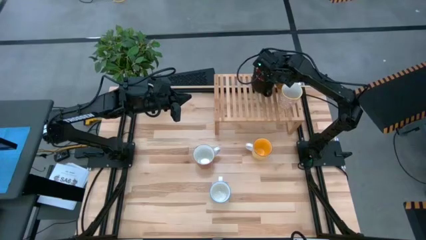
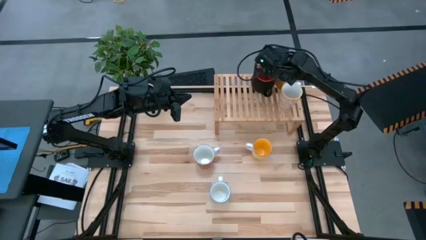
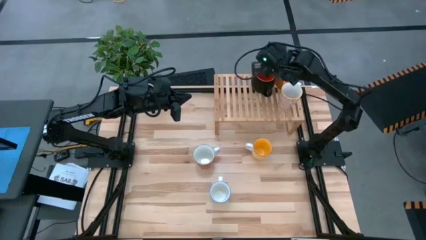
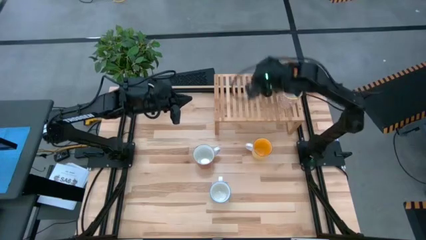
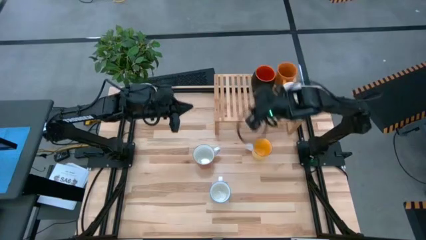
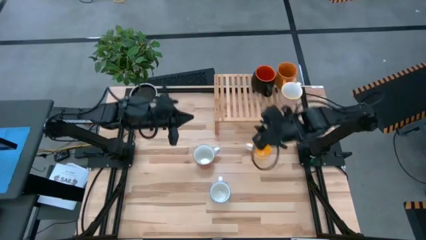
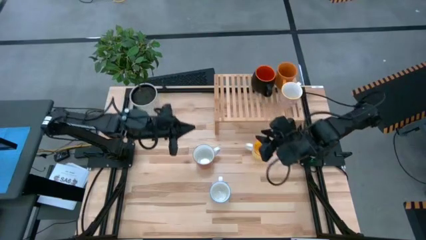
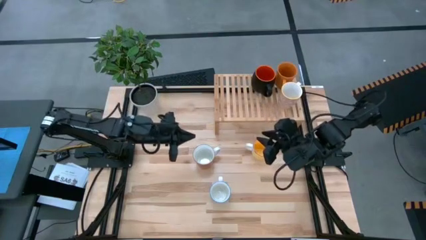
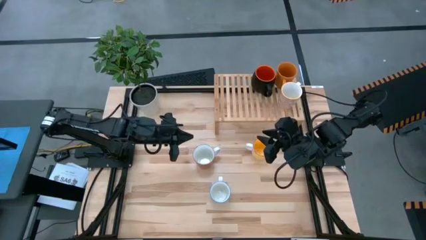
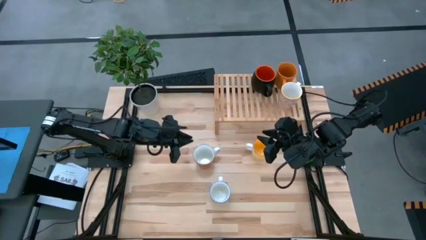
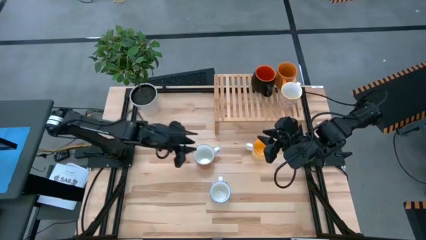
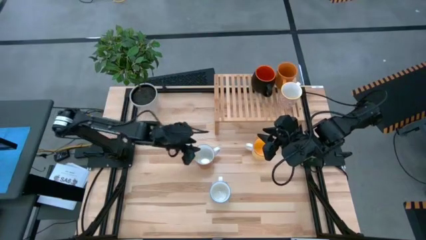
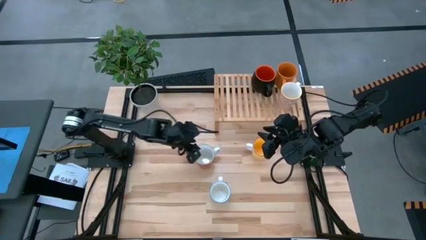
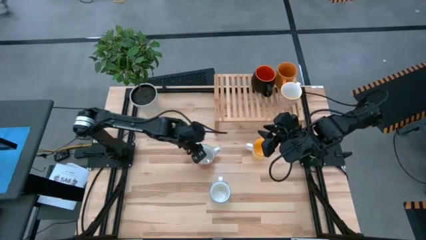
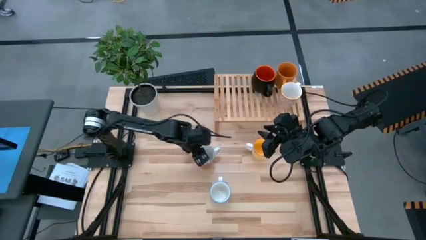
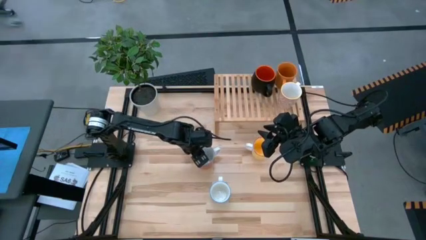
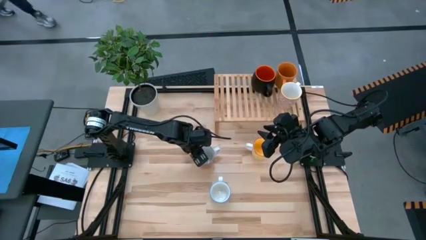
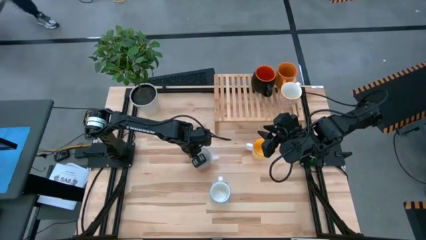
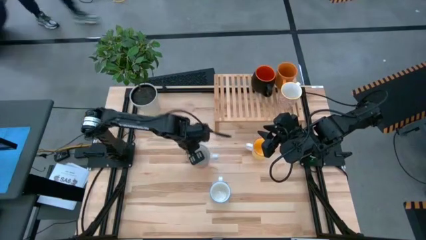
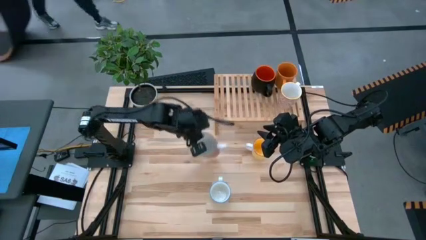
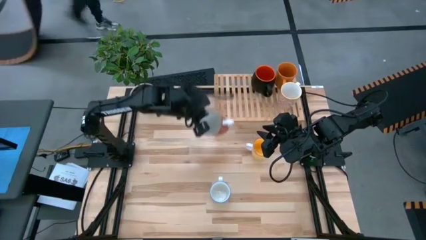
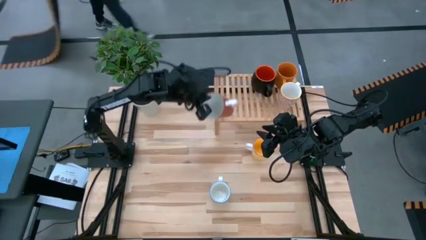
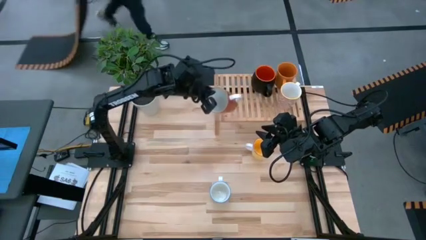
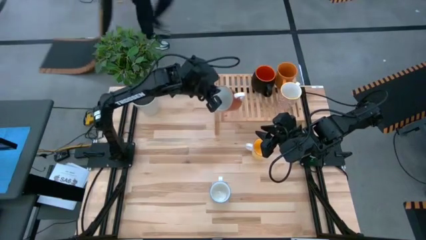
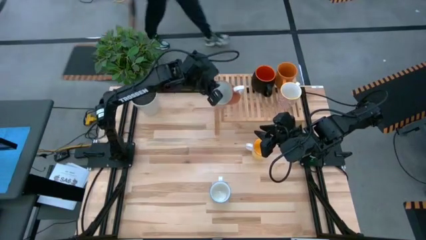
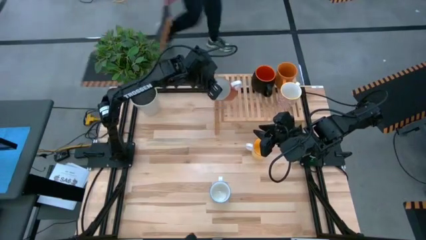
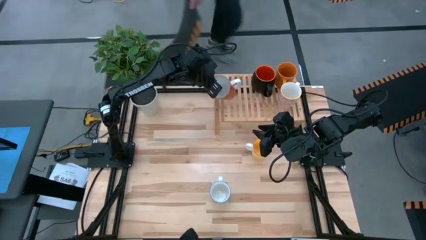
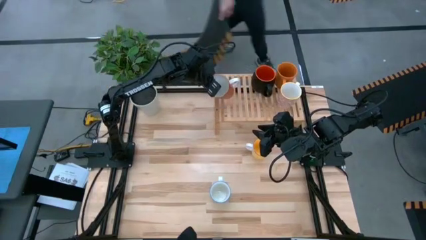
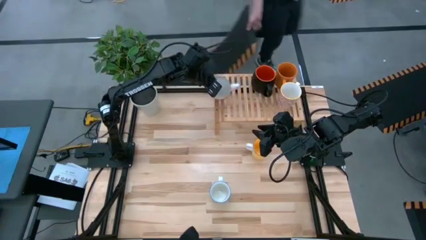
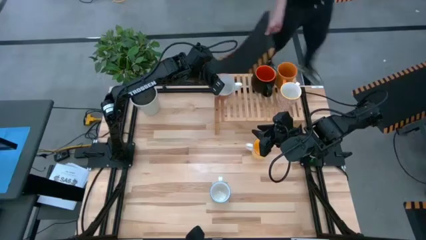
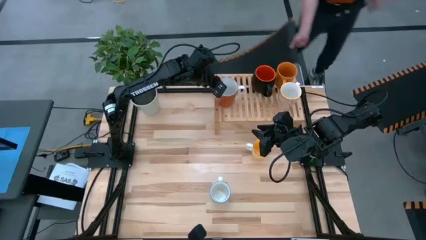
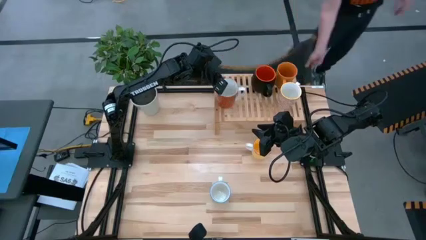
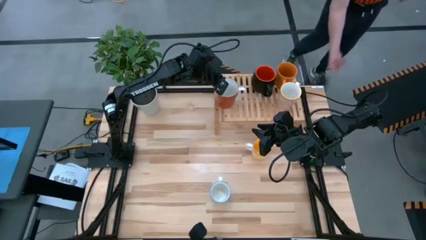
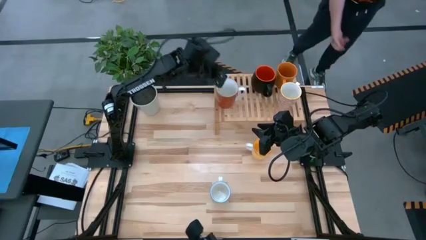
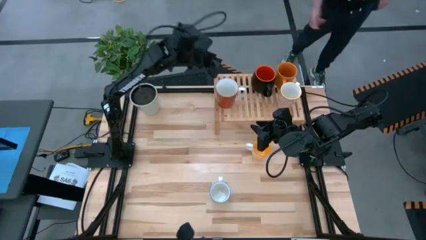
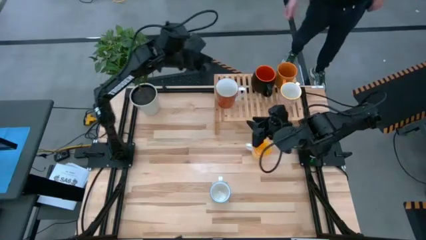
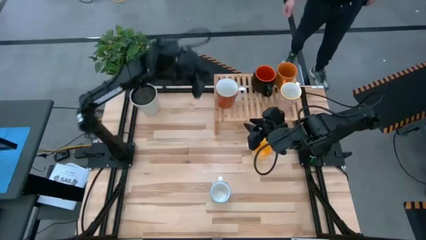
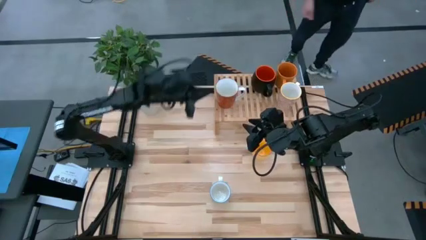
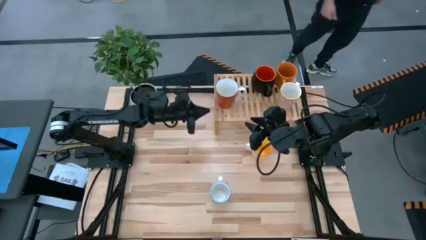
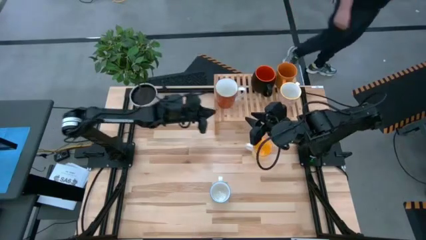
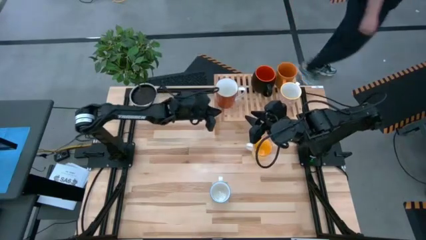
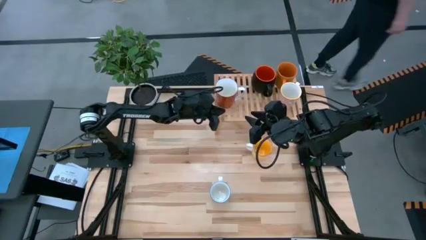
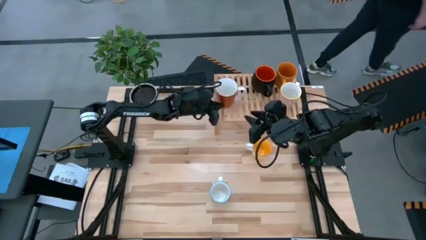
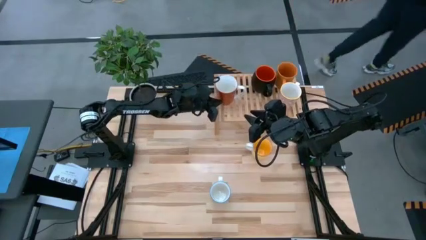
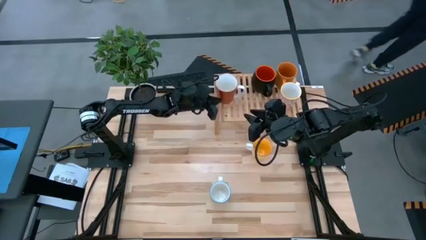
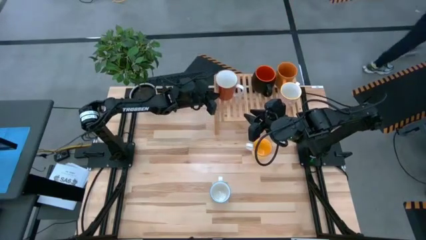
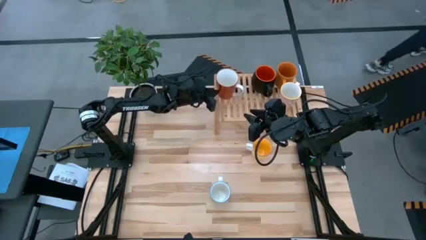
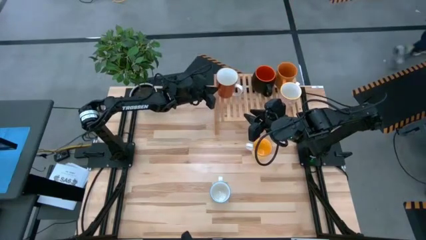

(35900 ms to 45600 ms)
Task: Place coffee mugs
Put the red mug on the shelf

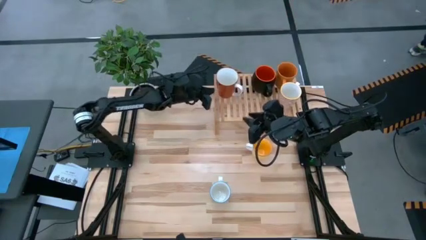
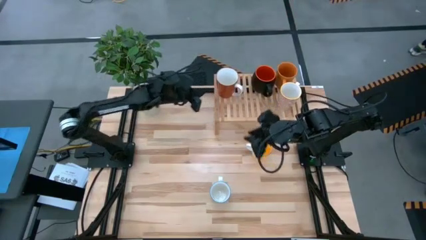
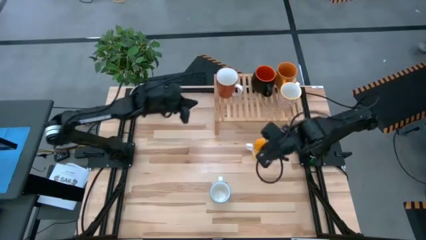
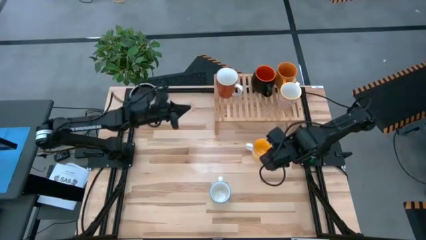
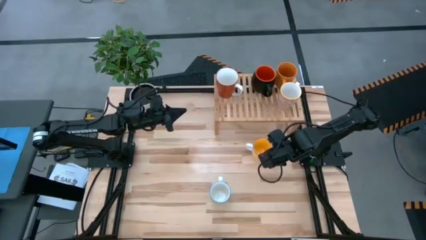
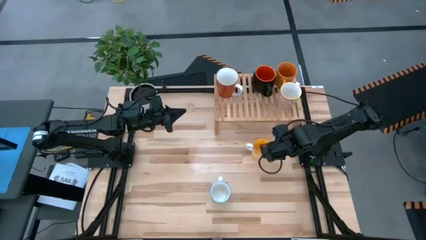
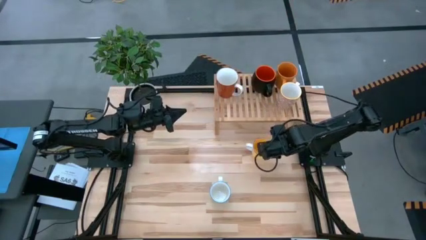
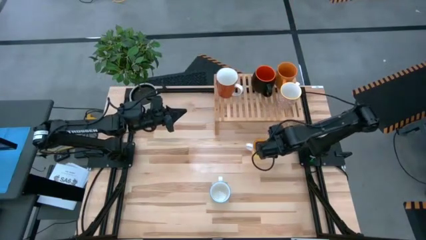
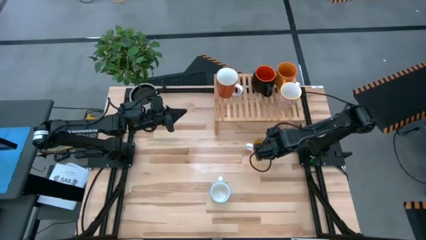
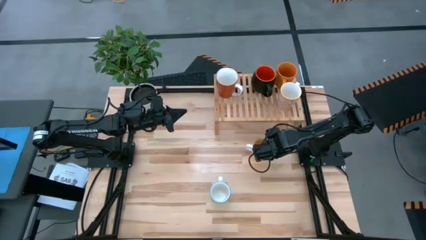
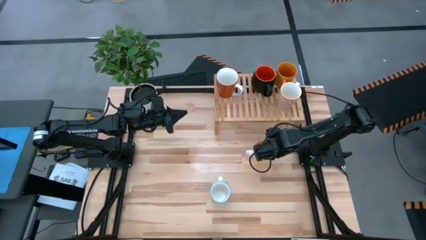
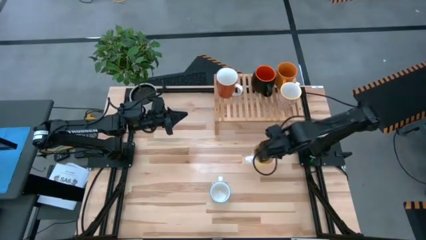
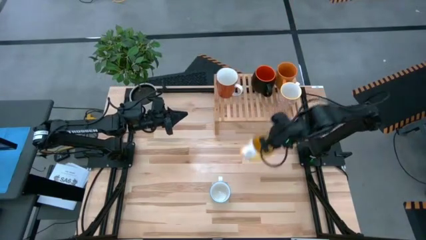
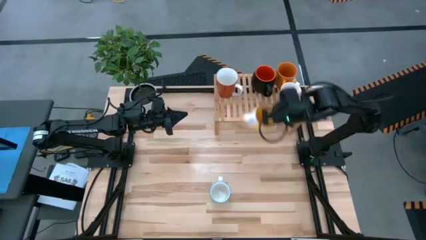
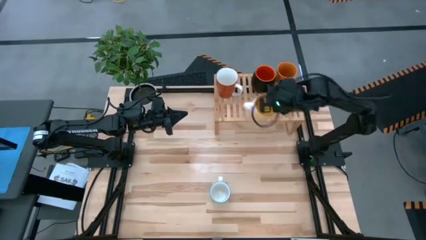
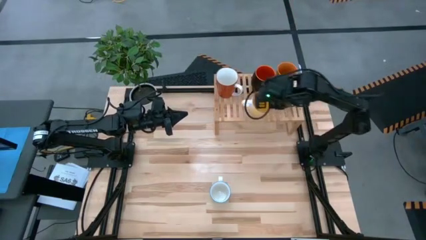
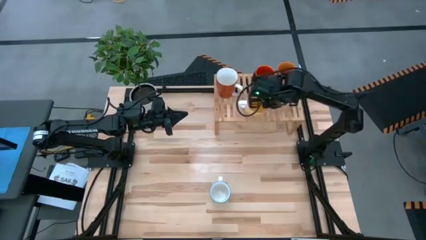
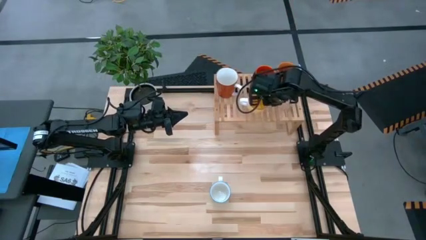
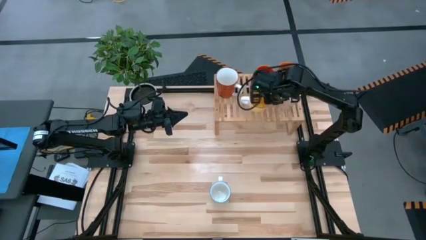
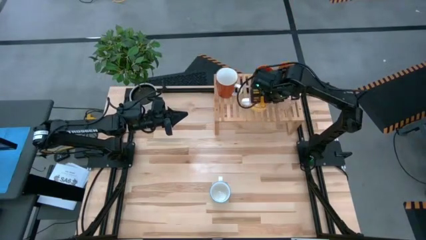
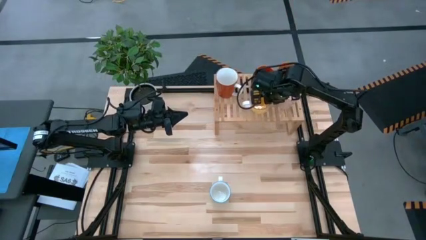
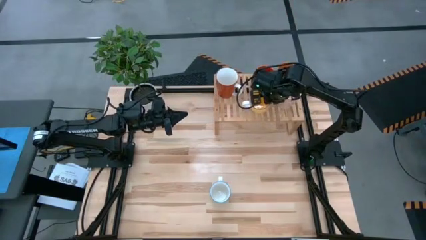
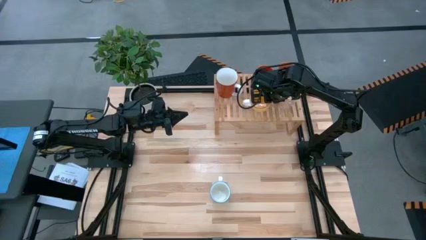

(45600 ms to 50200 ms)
Put the yellow mug on the shelf
